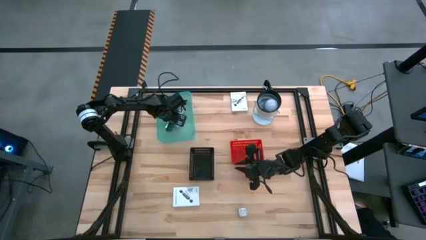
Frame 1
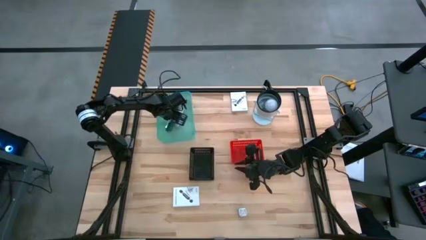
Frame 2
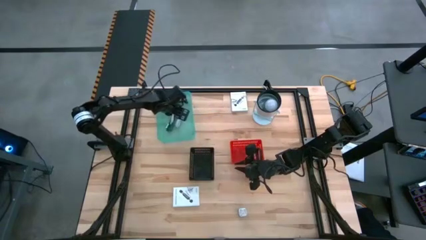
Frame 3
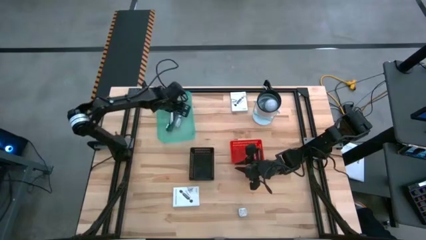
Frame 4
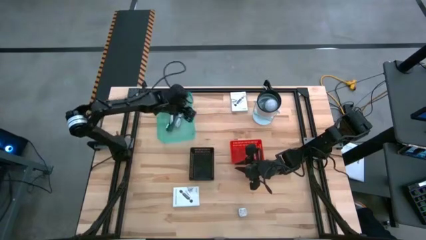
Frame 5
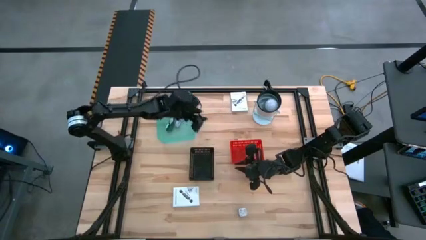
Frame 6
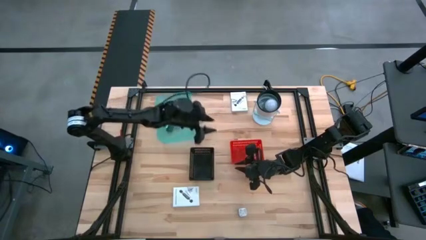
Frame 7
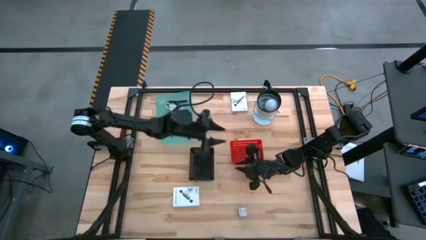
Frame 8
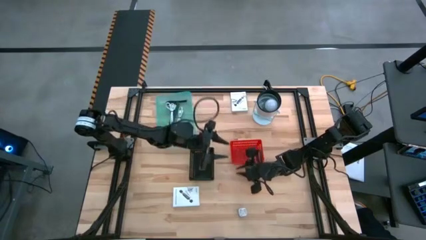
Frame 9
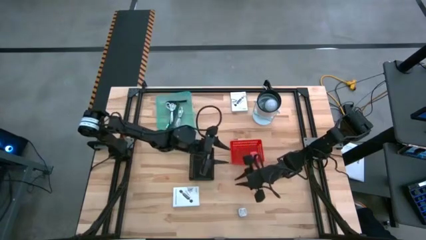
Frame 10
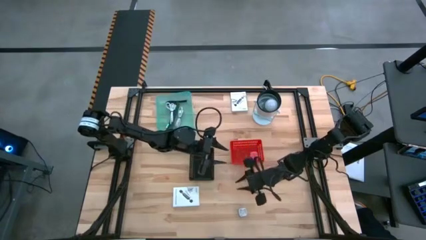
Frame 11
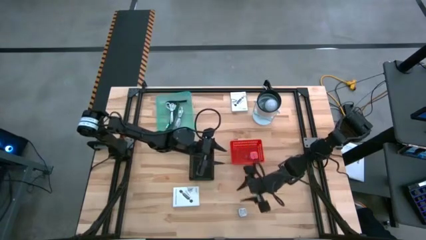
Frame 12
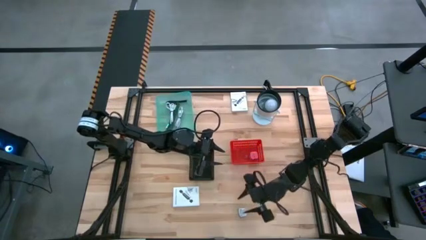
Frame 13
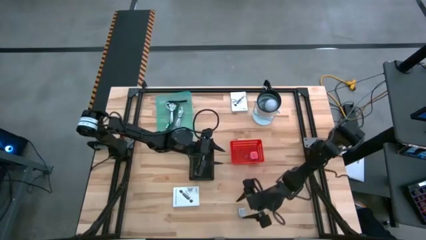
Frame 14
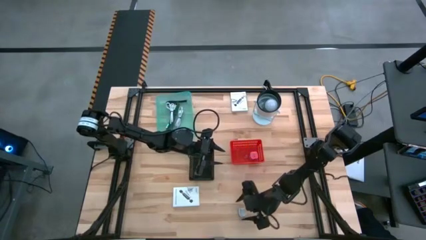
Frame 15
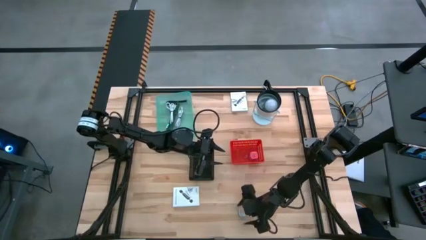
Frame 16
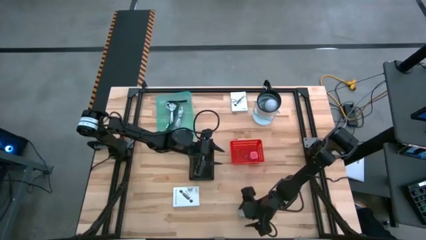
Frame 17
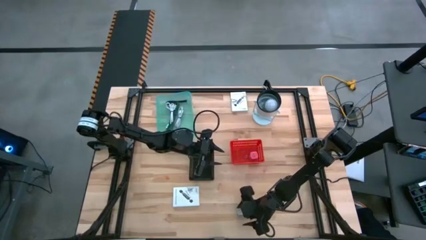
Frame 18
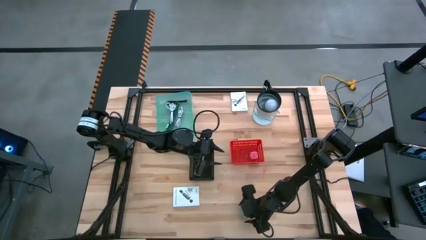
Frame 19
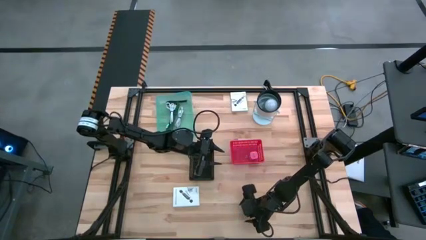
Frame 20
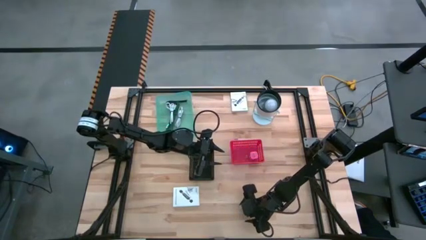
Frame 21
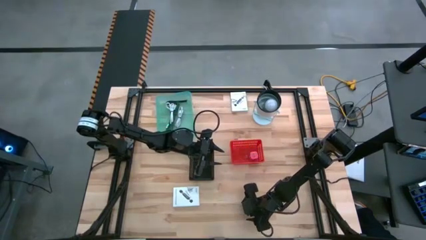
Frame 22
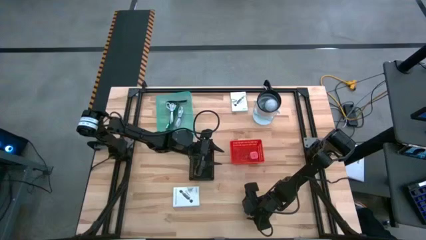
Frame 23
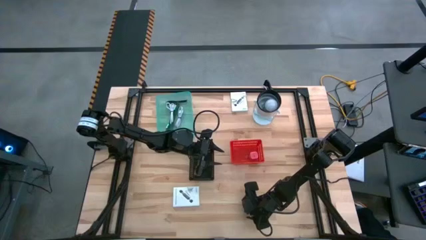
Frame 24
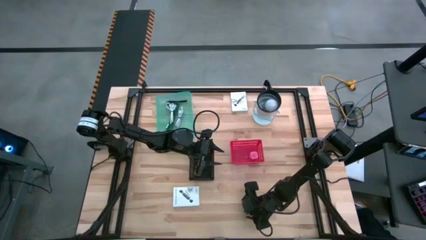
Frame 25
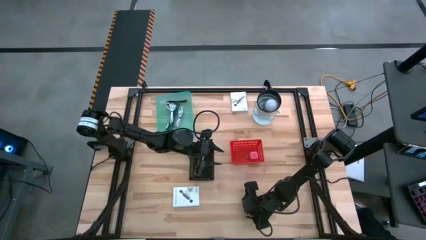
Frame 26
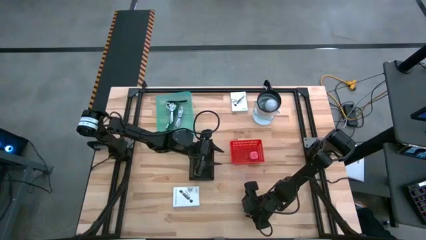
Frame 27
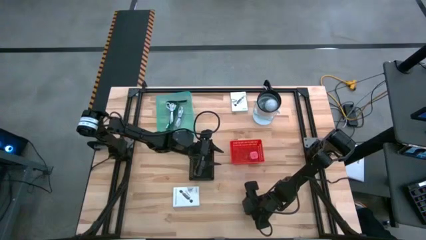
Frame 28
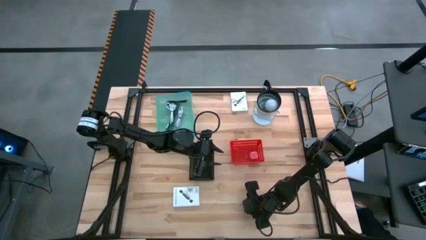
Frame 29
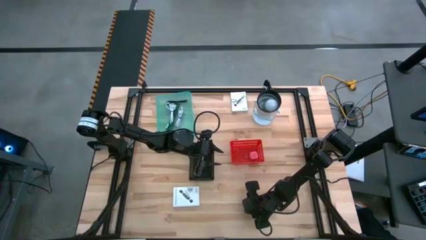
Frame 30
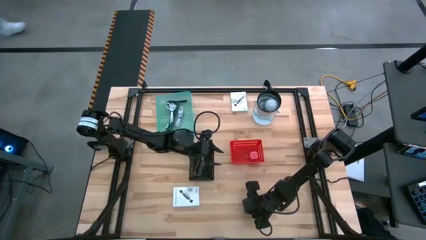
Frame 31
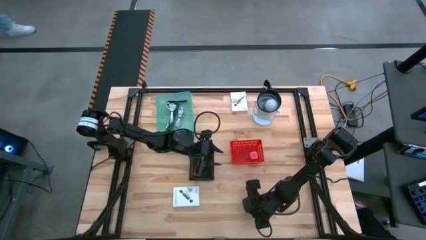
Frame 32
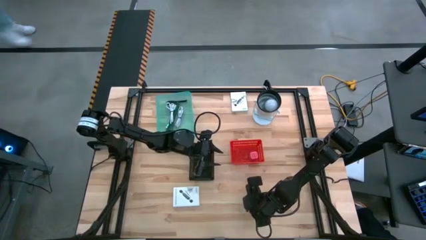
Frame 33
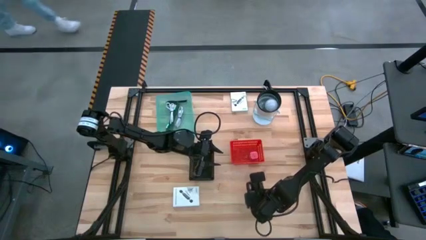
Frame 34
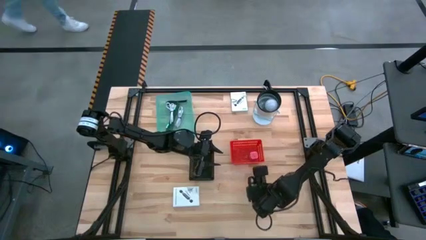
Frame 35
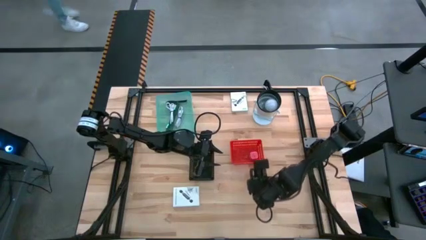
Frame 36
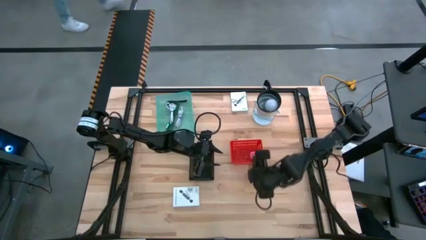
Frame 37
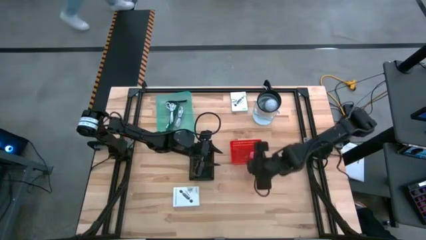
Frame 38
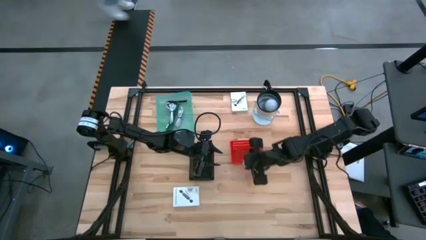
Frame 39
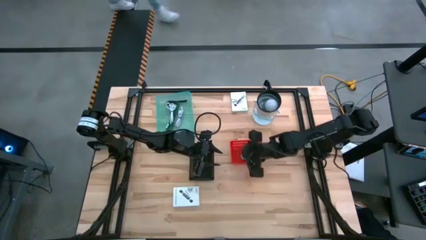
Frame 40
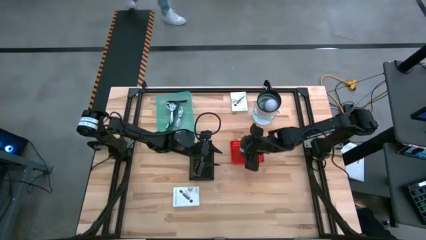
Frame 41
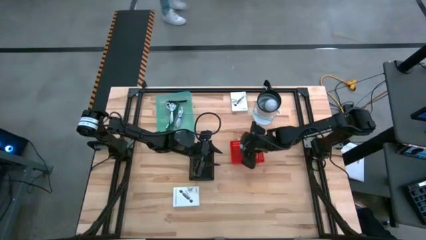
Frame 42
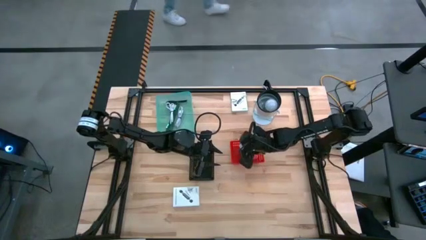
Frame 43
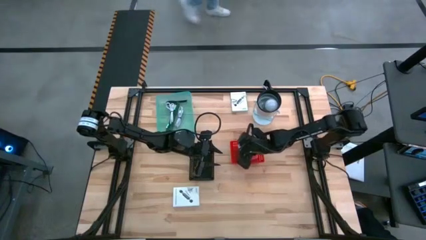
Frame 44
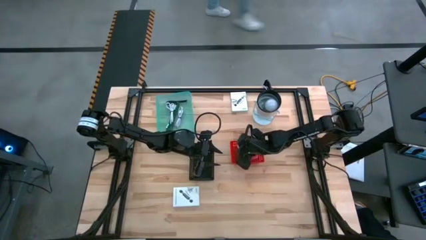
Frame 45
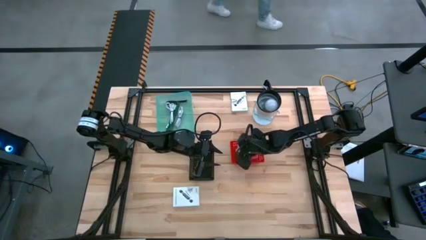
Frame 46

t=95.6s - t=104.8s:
Task: Pick and place items into bin
Put the violet charger adapter into the red bin

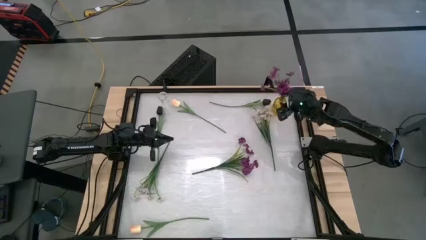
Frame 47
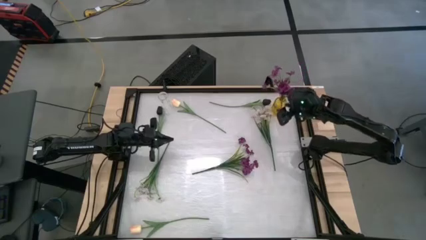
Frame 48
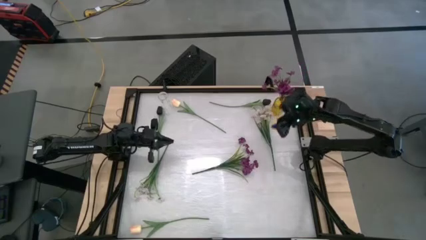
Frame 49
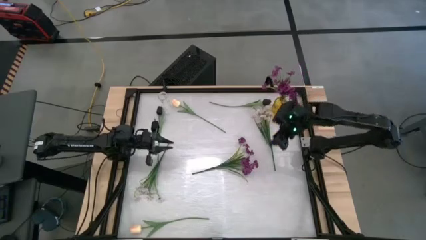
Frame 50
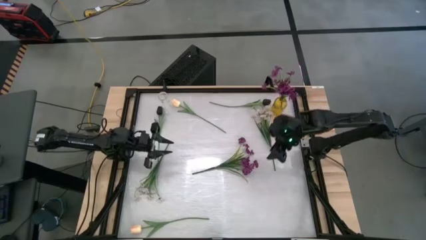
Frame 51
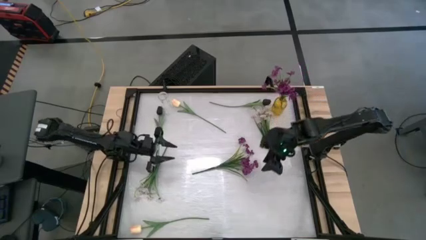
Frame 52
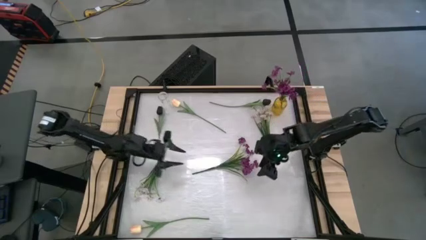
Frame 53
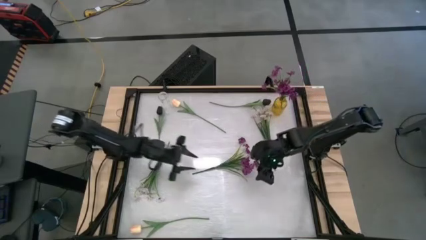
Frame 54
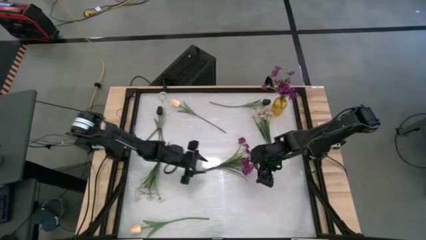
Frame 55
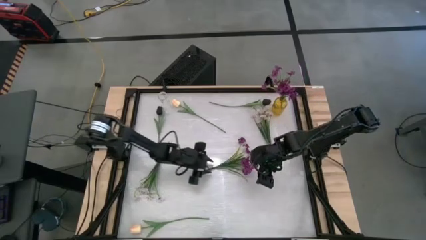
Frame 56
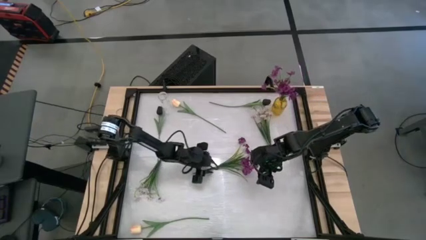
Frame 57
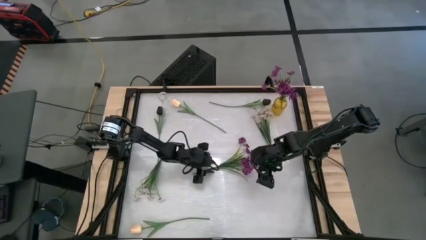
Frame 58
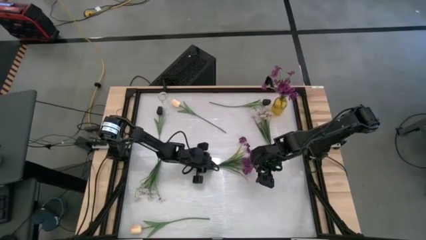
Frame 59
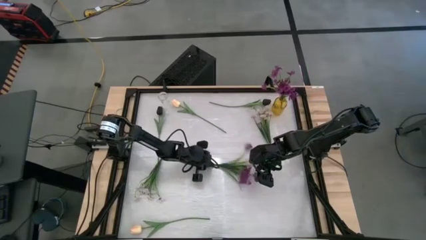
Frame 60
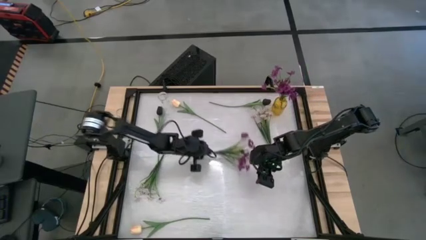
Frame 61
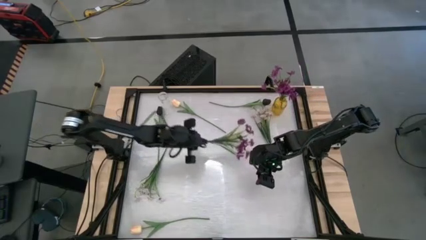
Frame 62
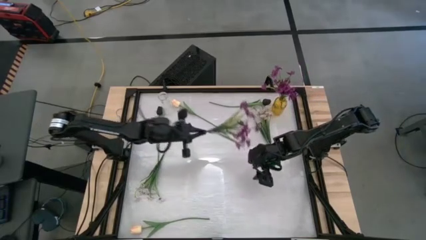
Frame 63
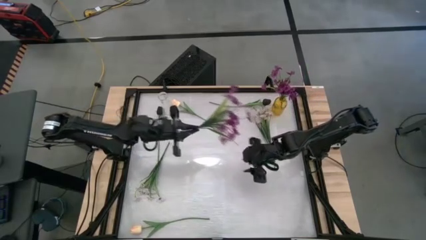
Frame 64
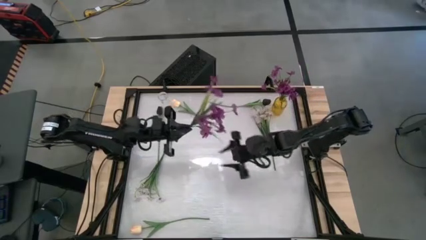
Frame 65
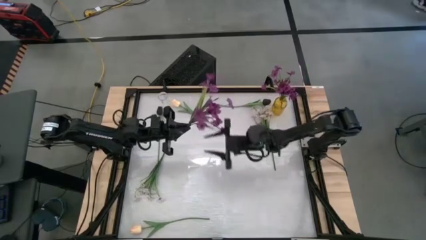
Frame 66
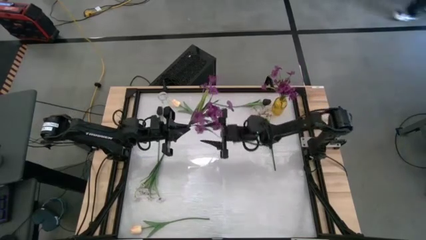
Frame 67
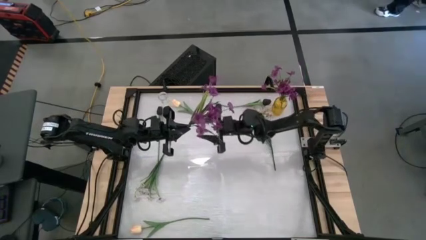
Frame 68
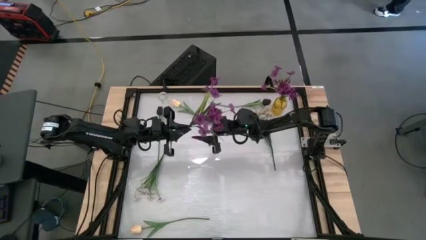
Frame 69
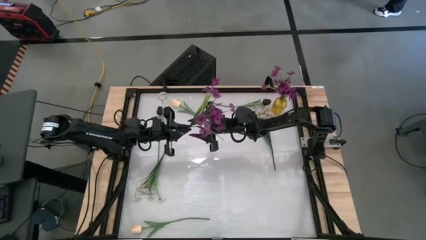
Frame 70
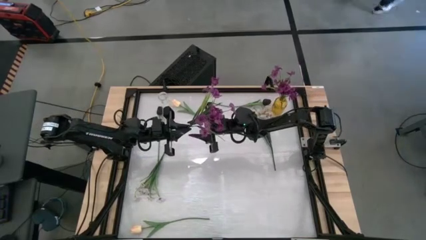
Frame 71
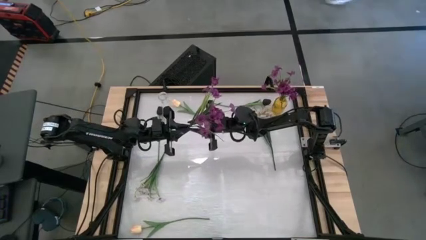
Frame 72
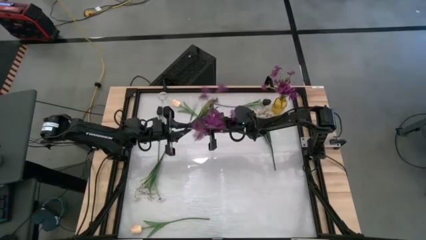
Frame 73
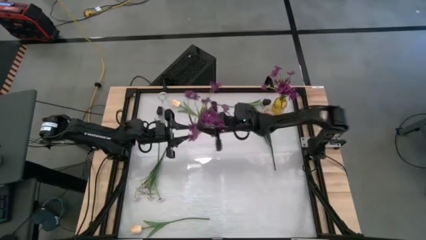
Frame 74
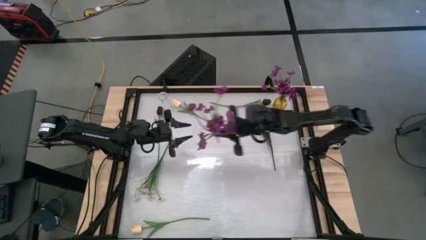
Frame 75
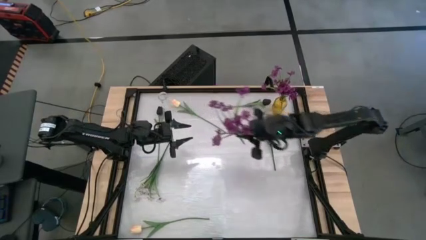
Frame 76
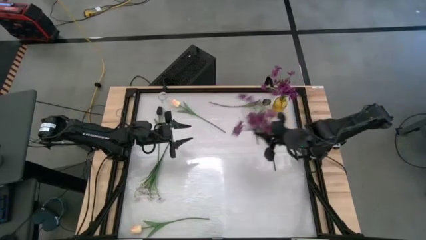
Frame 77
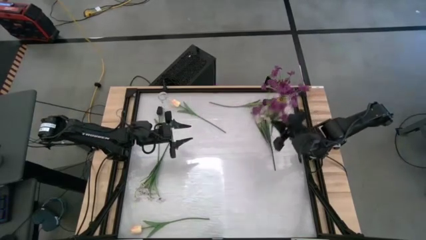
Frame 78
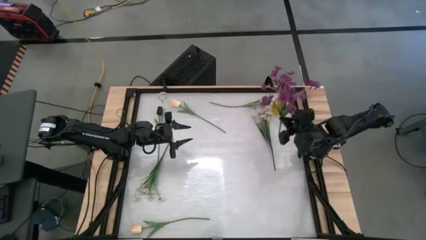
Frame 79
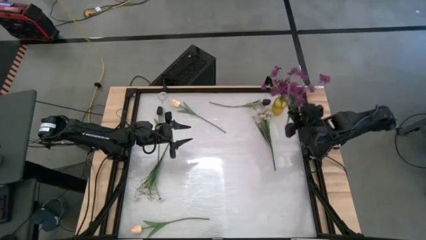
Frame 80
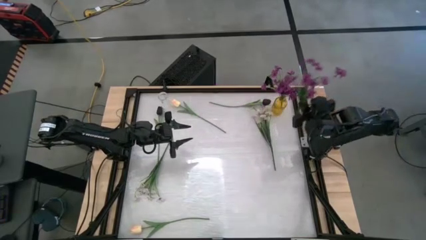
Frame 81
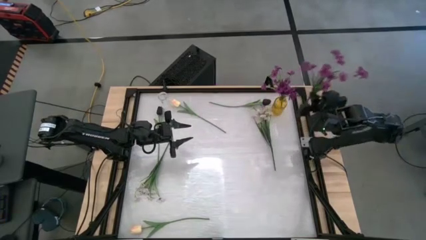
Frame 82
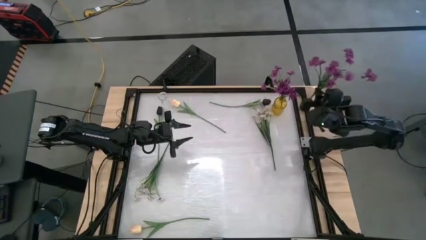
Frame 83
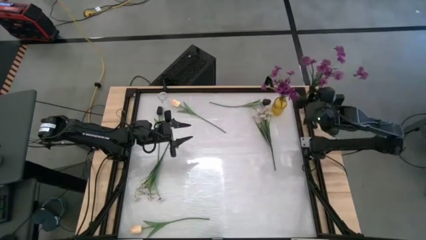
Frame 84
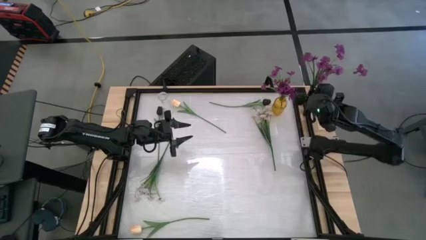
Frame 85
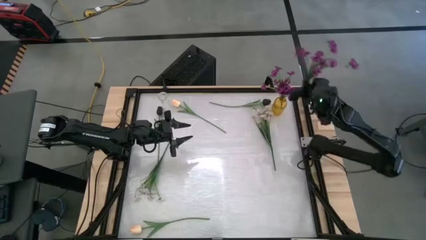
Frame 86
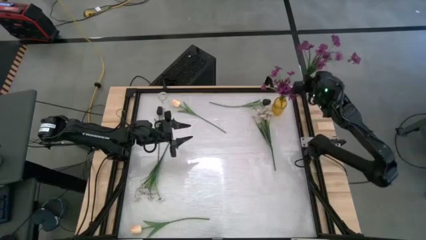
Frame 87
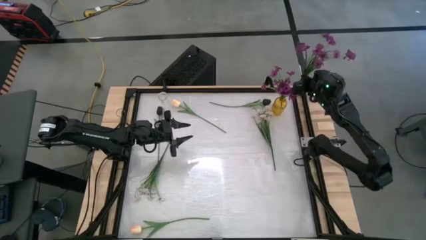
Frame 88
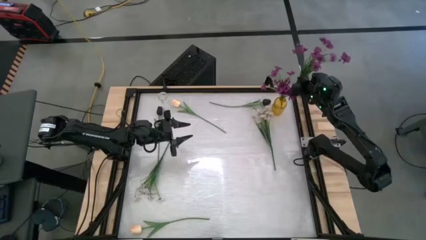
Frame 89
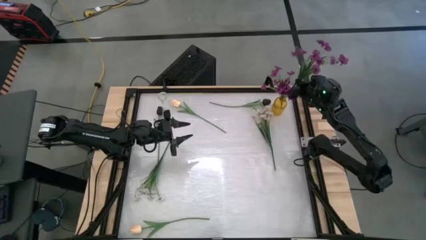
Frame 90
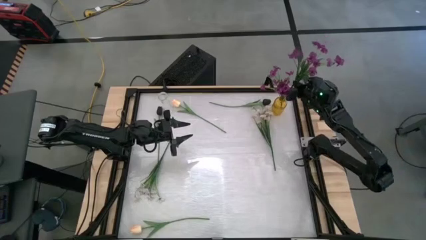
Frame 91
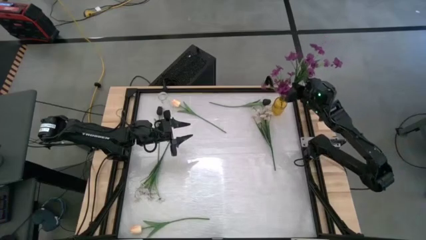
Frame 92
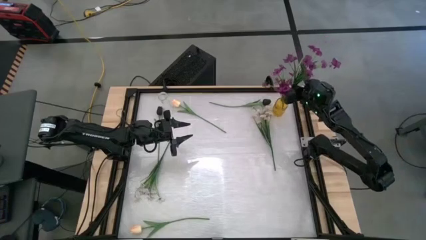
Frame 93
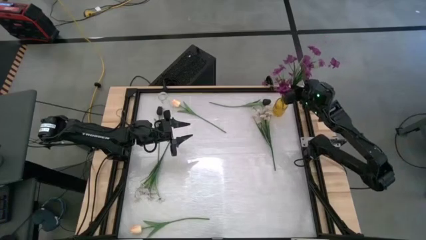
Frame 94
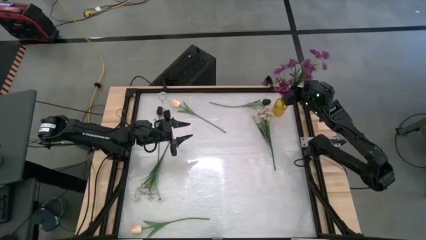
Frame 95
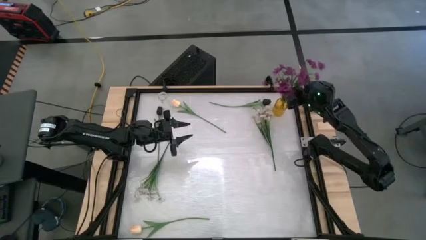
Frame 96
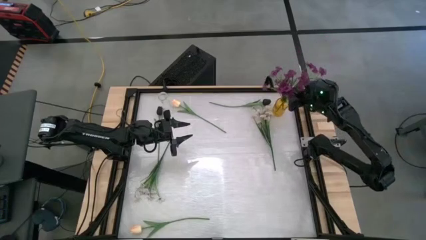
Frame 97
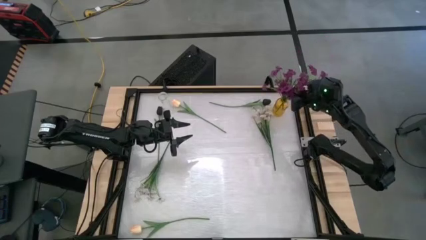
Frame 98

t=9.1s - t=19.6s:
Task: Sort flowers into vase by color
Put the violet flower into the yellow vase
